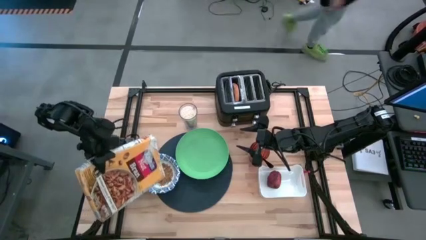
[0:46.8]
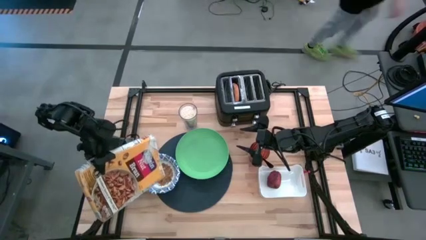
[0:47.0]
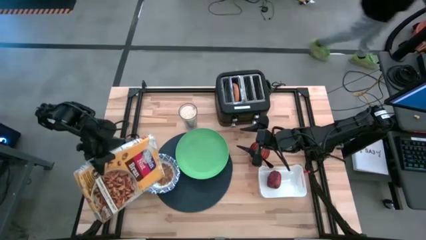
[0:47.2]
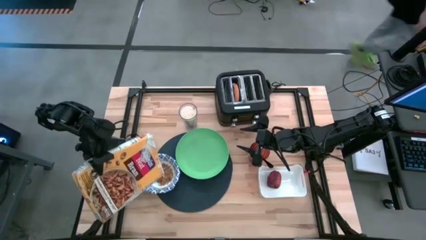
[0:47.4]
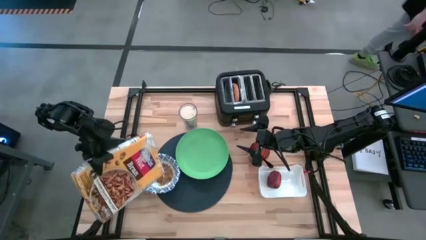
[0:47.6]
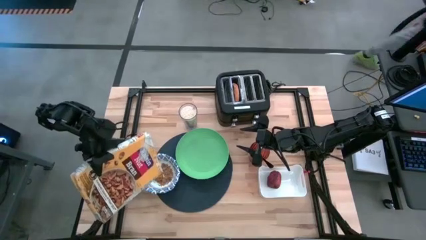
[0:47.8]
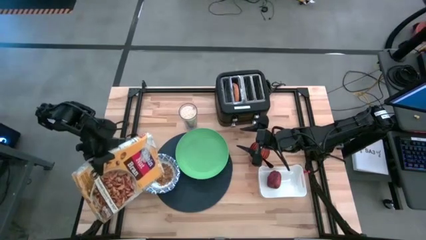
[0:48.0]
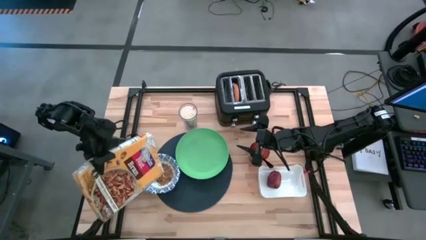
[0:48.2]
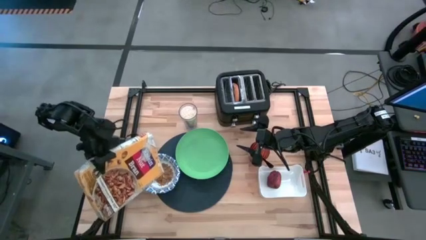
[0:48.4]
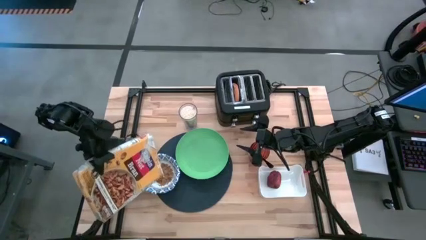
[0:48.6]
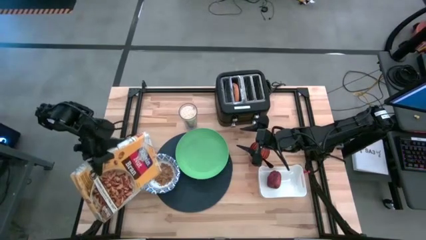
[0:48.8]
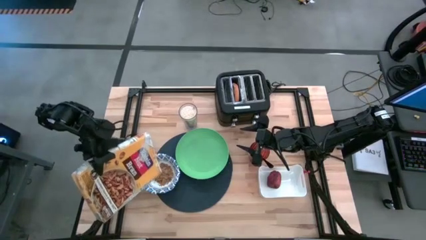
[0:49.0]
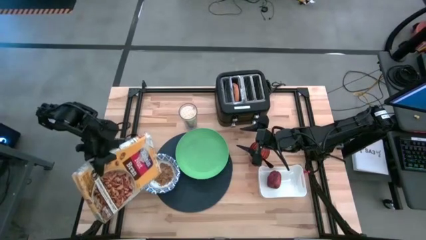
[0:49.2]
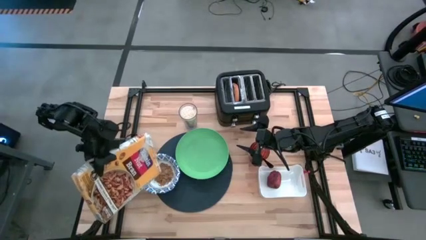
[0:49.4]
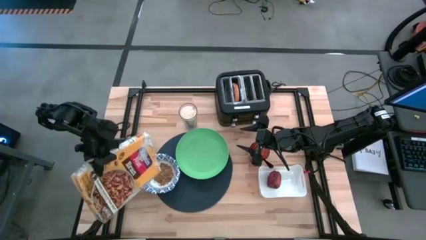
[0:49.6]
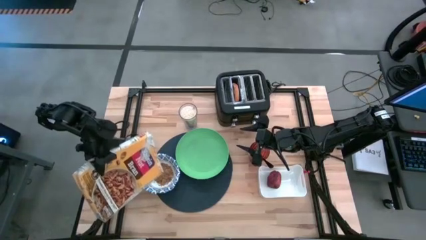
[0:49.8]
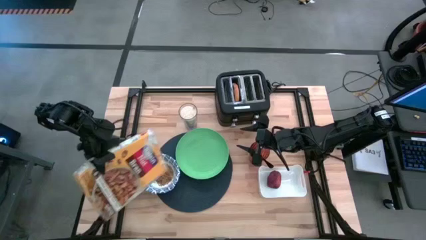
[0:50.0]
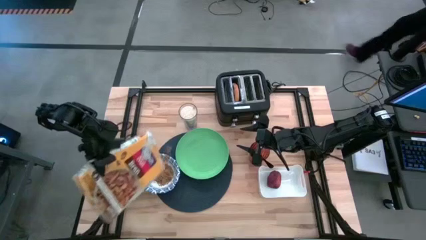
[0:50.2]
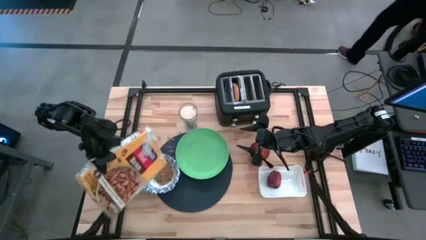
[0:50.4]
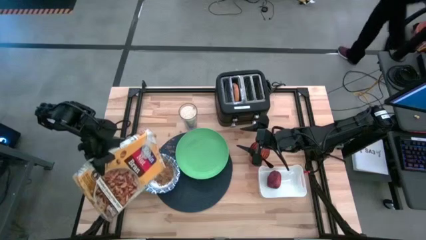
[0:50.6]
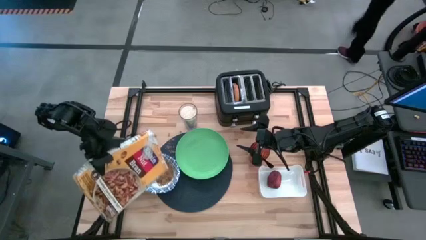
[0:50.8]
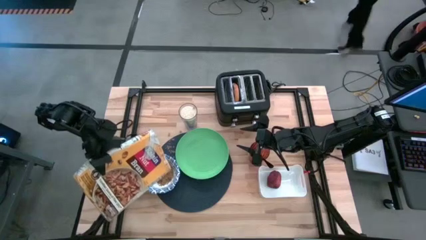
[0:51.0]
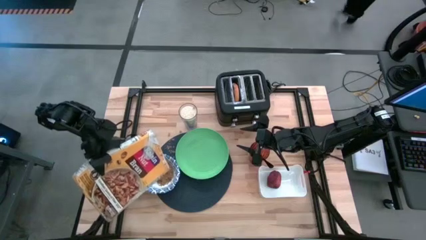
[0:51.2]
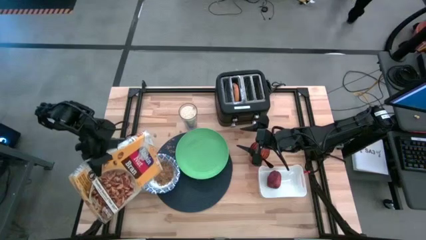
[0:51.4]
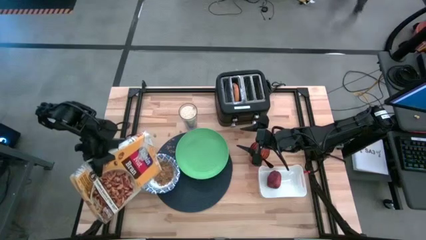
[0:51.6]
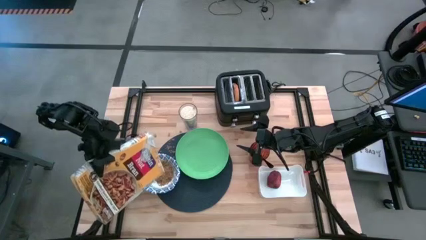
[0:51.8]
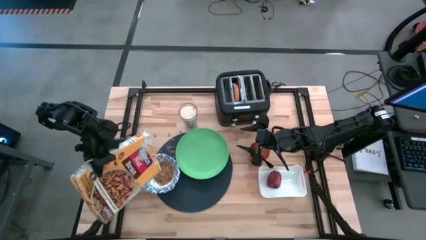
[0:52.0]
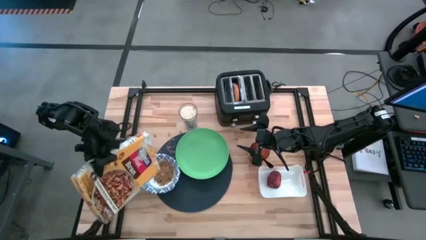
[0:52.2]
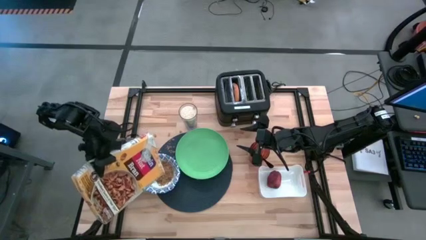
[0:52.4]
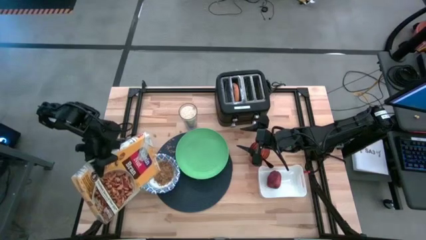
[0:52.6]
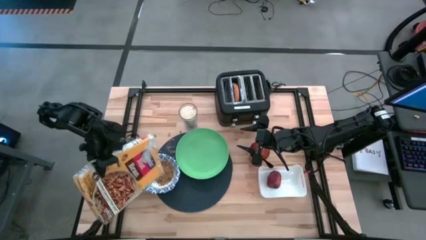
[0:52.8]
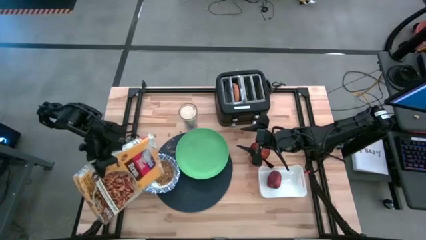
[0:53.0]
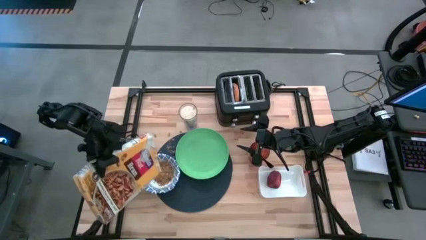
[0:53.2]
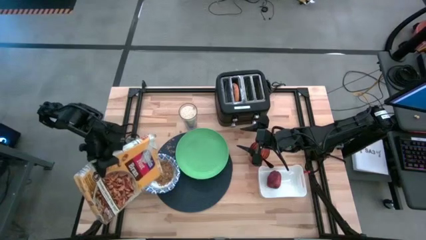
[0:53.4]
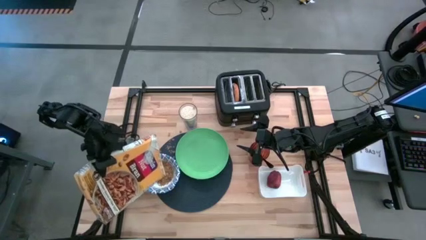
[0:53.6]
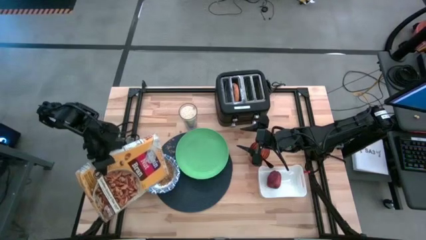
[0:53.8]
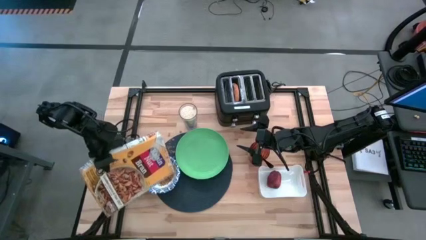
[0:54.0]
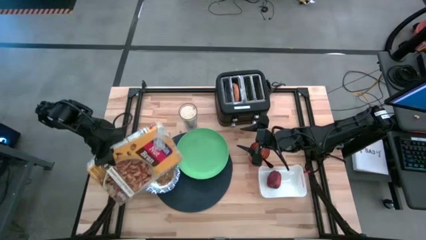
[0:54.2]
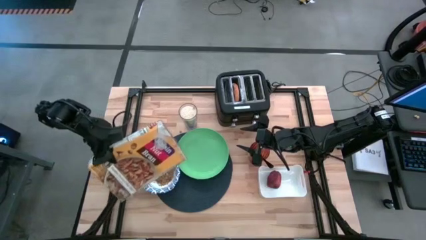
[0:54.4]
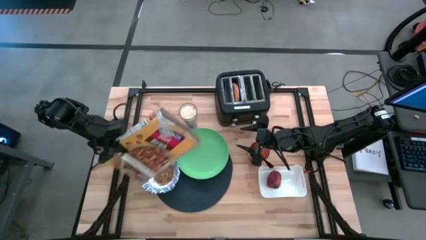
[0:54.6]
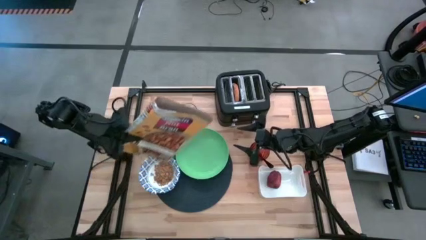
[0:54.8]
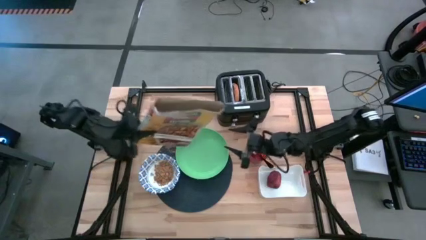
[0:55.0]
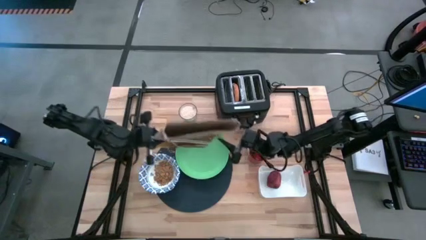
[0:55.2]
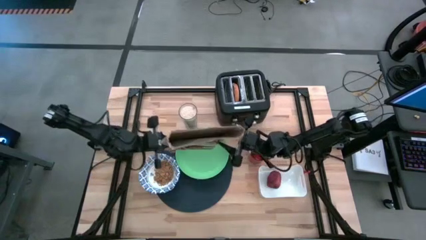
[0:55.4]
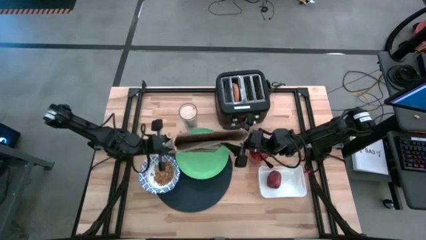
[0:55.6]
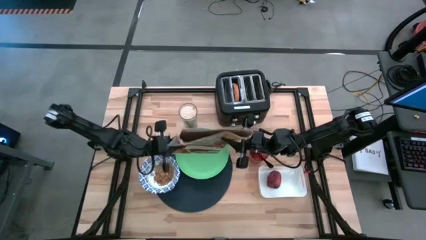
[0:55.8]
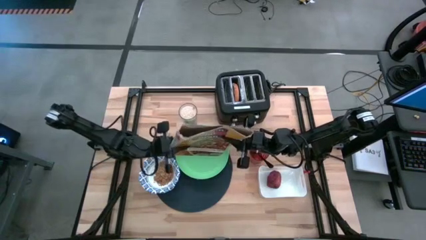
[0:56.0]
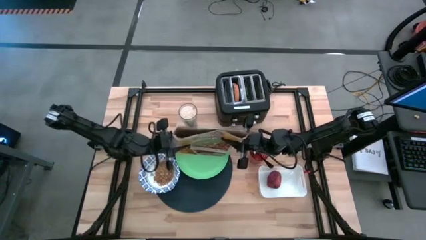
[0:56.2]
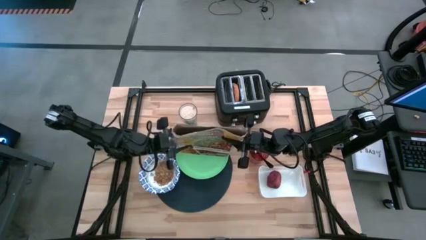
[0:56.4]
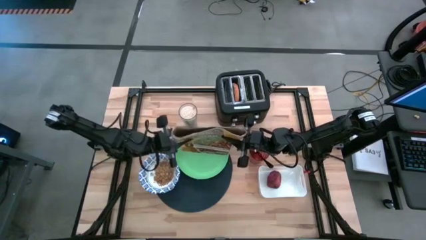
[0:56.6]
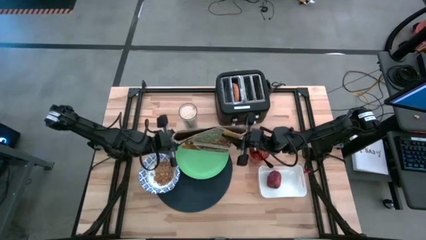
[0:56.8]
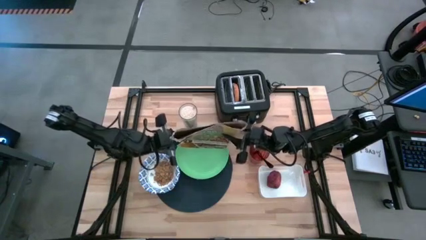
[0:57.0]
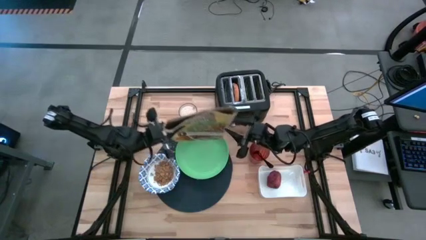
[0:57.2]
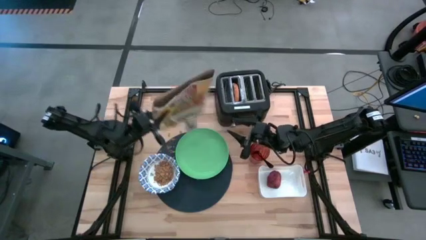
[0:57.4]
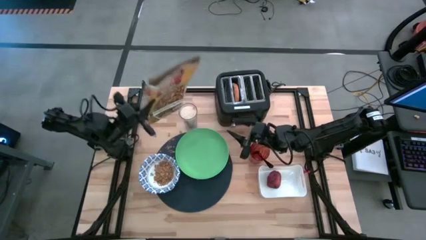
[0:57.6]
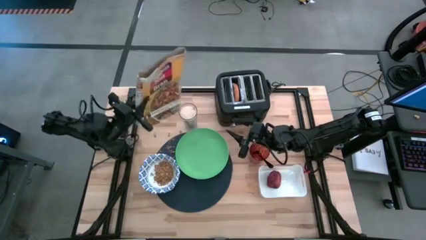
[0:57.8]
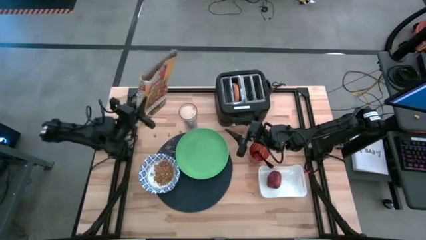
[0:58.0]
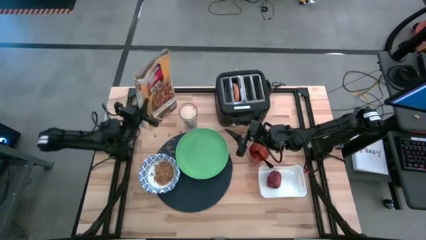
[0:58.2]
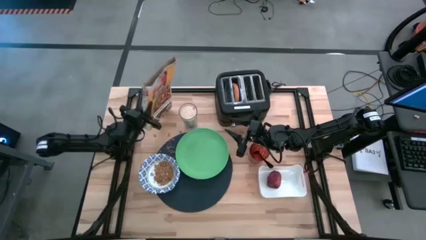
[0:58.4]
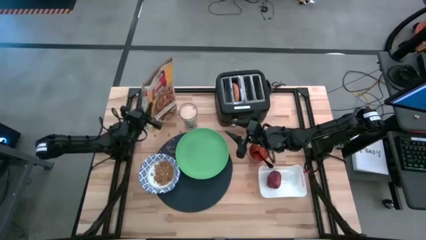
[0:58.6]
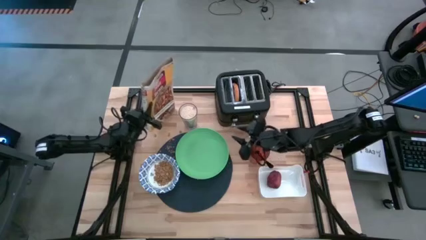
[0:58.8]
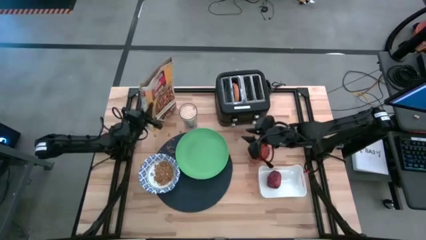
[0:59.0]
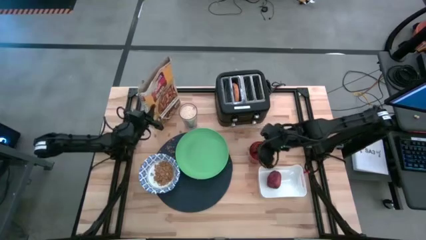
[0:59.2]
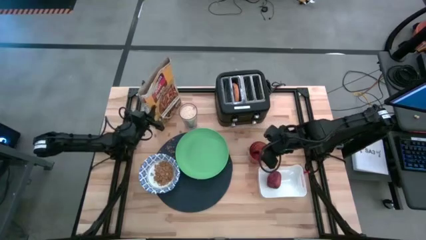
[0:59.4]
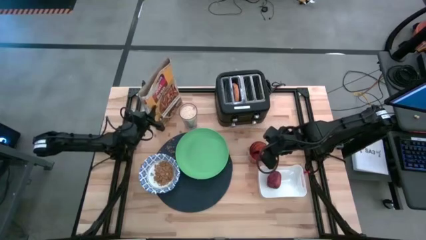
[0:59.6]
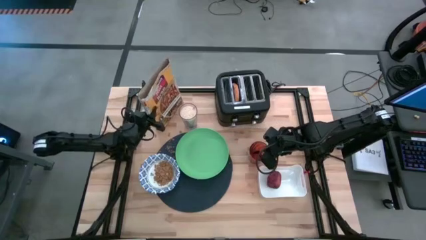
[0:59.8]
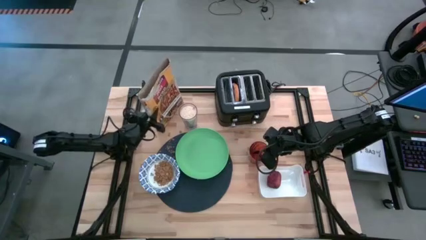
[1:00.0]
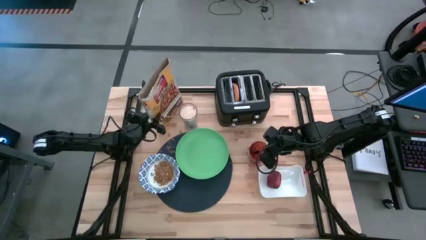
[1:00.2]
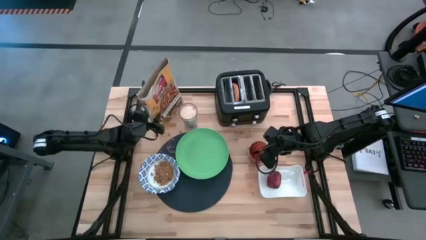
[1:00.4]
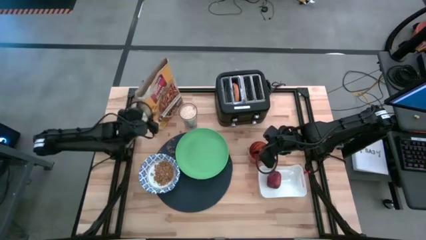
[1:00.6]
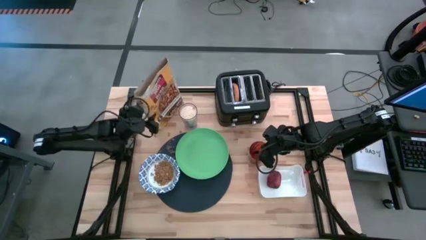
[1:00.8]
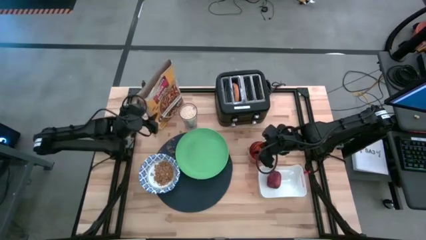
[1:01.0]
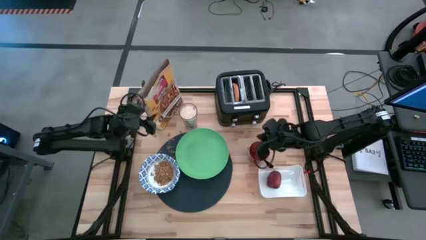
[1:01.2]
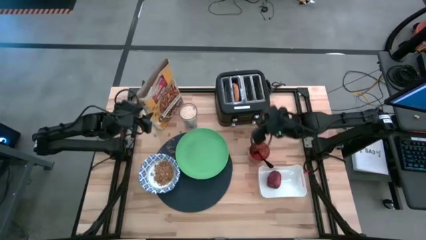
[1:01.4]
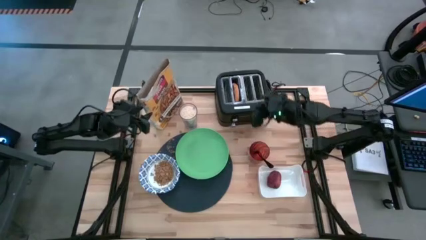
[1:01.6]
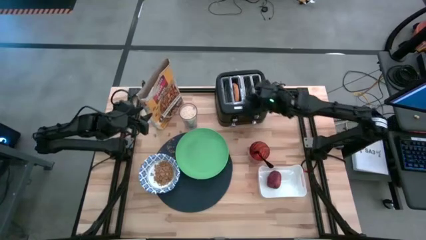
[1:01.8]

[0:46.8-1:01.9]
Task: Arrange a breakfast setting
Pour the cereal from the cereal box into the white bowl

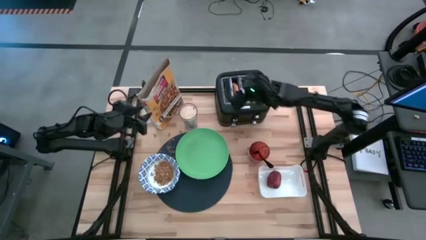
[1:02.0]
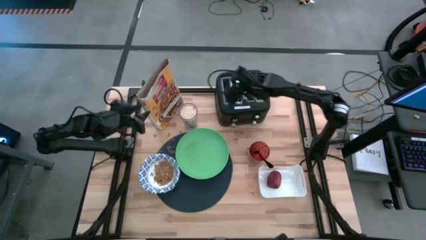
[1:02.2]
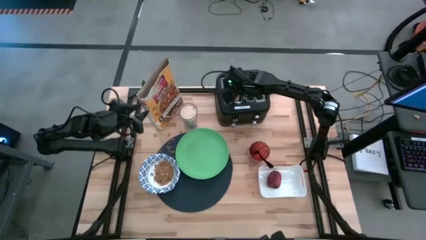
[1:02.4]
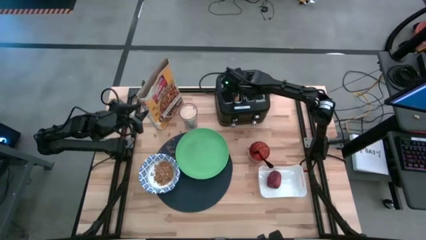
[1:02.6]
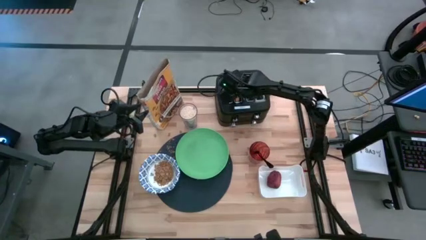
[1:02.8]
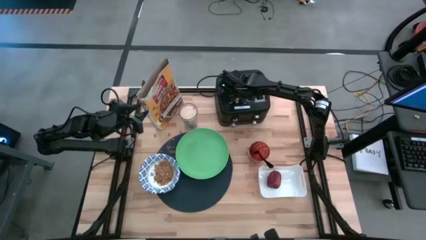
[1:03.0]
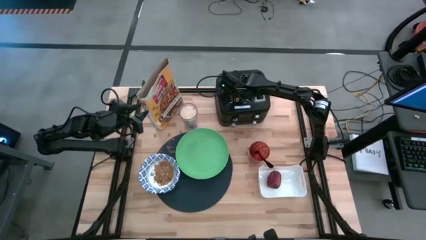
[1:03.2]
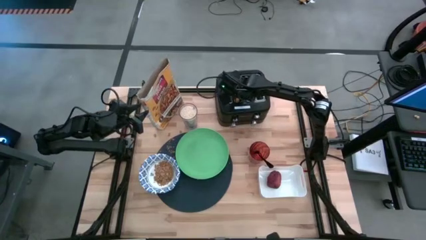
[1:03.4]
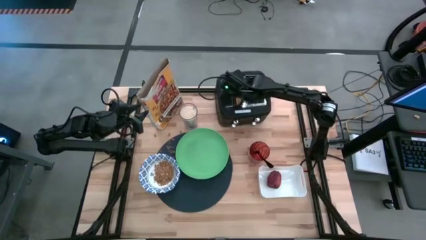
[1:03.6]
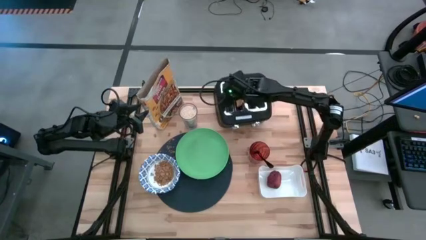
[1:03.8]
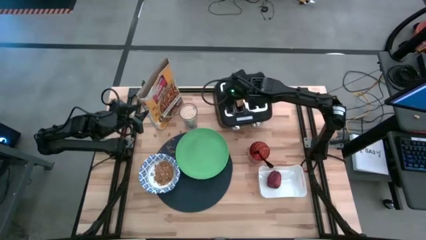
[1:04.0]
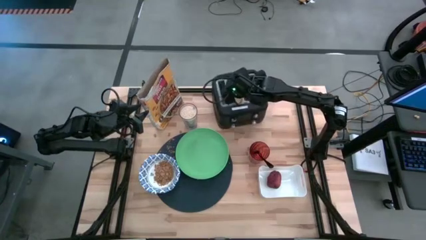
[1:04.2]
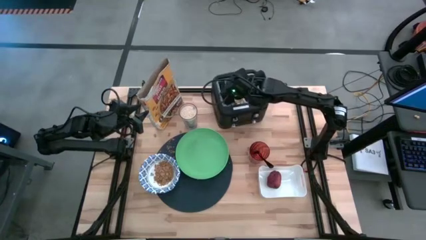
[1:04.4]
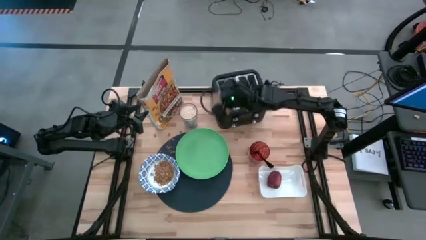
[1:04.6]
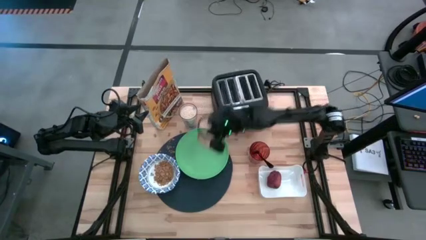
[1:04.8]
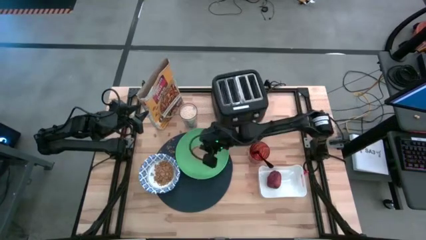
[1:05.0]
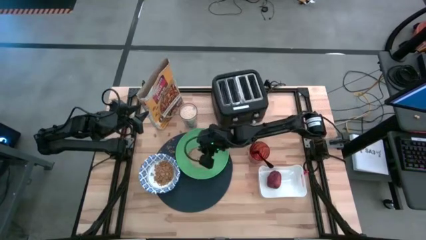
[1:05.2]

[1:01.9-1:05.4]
Put the bread from the toaster on the green plate
